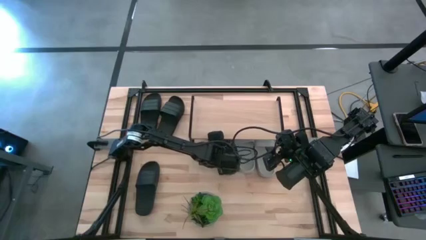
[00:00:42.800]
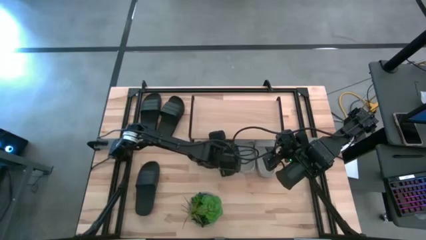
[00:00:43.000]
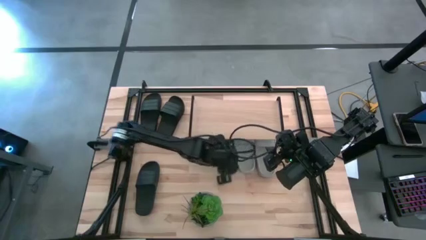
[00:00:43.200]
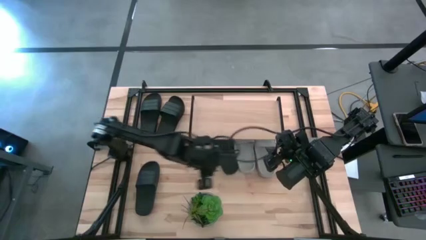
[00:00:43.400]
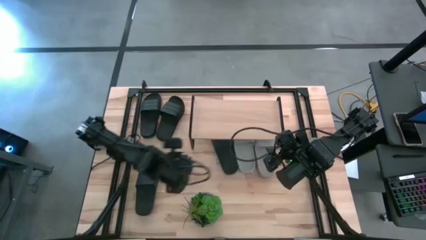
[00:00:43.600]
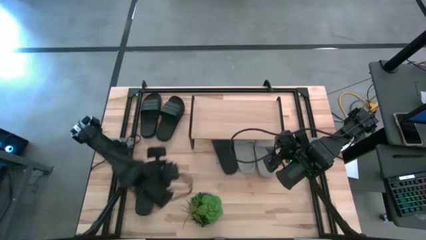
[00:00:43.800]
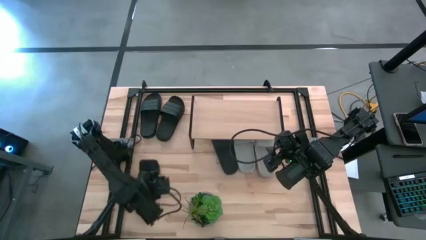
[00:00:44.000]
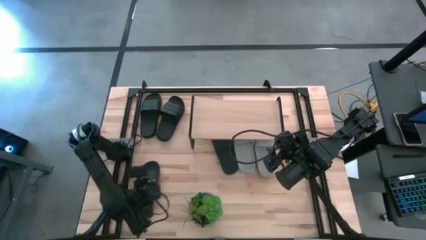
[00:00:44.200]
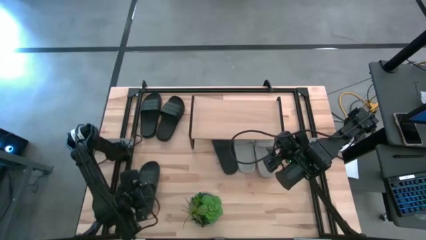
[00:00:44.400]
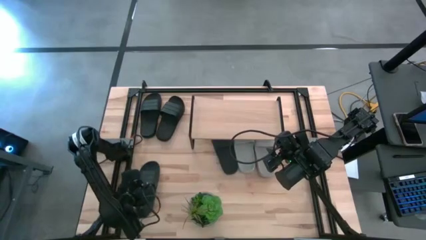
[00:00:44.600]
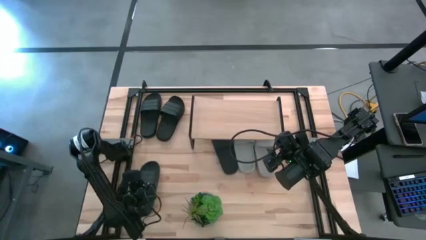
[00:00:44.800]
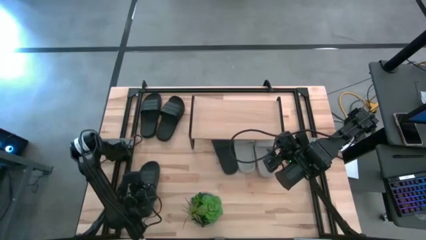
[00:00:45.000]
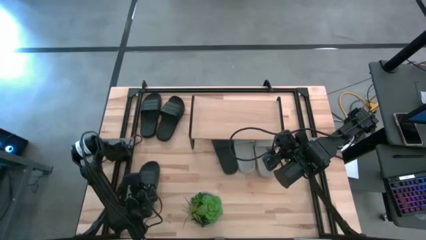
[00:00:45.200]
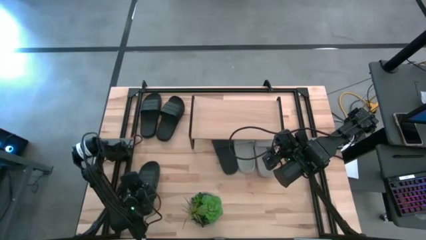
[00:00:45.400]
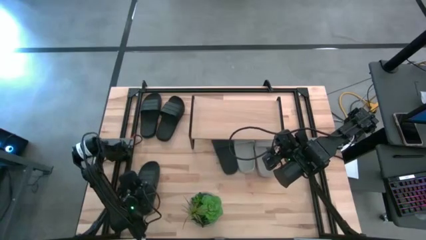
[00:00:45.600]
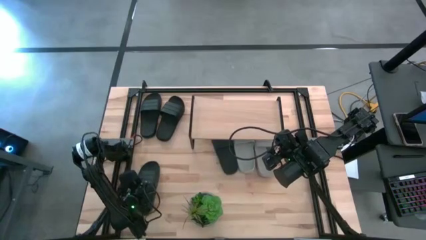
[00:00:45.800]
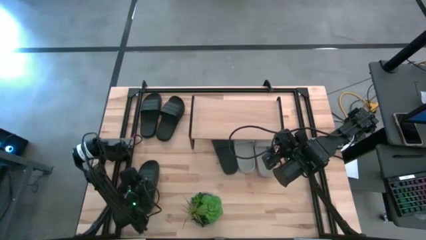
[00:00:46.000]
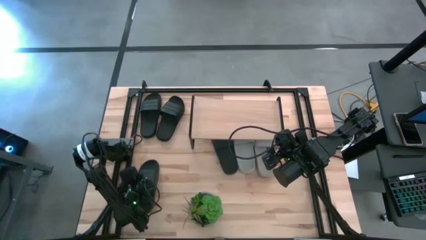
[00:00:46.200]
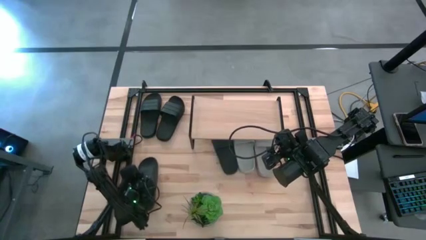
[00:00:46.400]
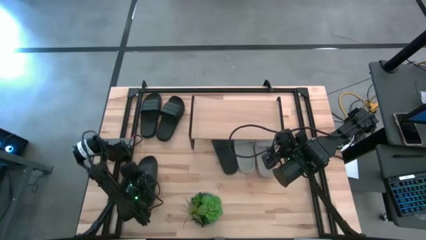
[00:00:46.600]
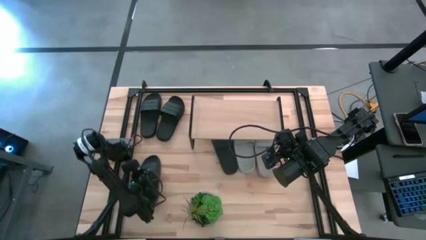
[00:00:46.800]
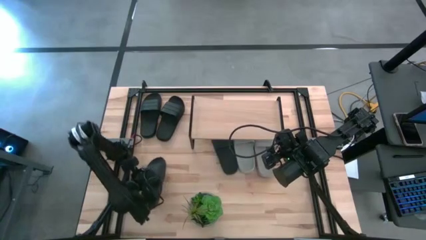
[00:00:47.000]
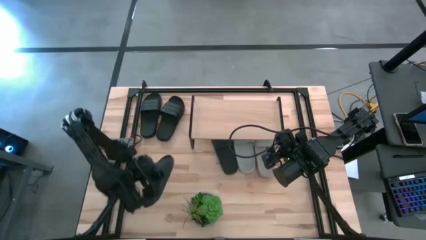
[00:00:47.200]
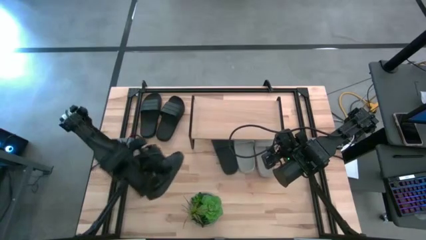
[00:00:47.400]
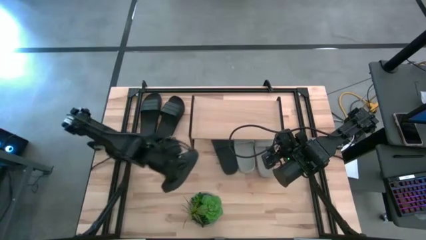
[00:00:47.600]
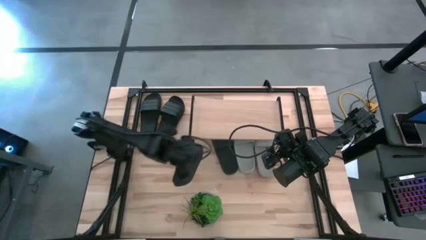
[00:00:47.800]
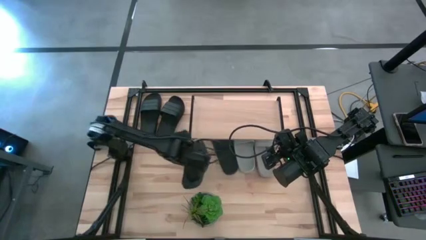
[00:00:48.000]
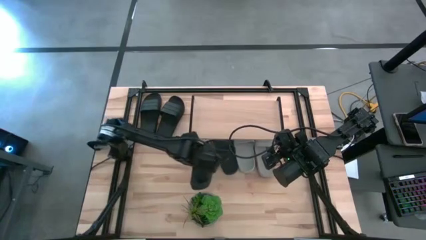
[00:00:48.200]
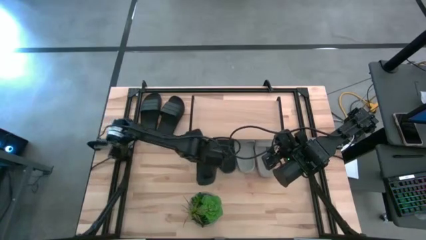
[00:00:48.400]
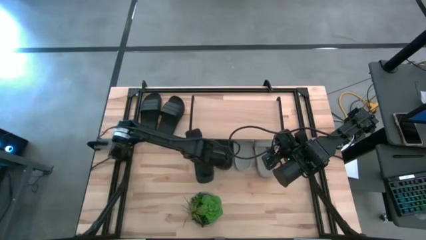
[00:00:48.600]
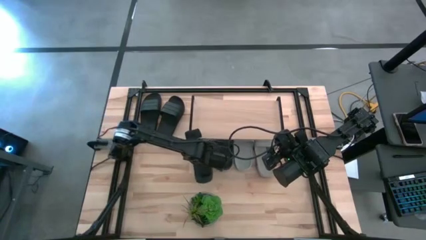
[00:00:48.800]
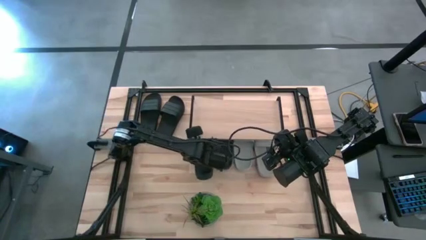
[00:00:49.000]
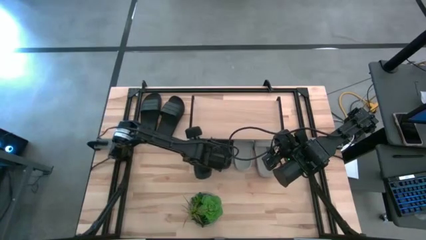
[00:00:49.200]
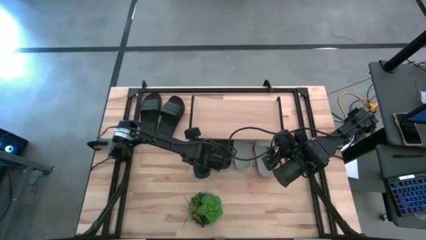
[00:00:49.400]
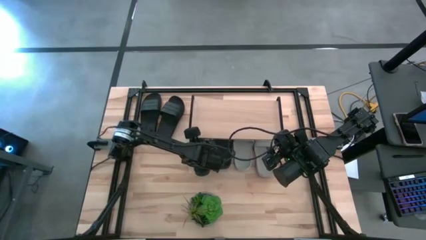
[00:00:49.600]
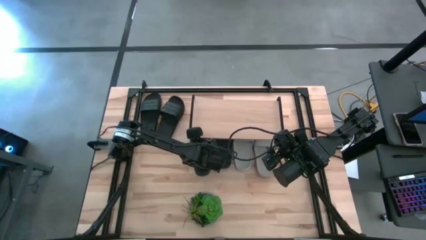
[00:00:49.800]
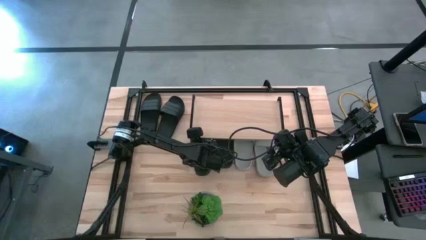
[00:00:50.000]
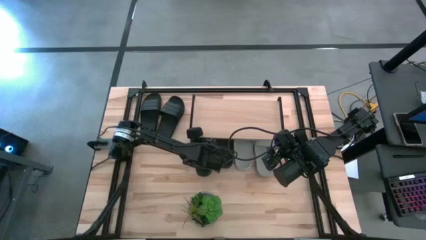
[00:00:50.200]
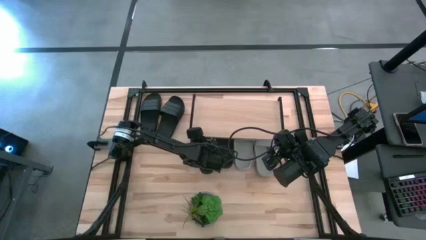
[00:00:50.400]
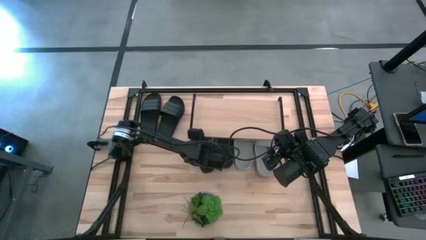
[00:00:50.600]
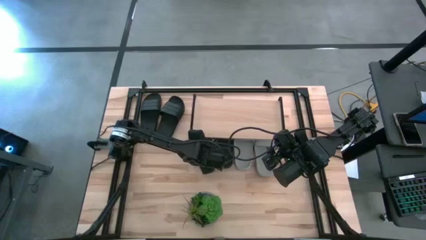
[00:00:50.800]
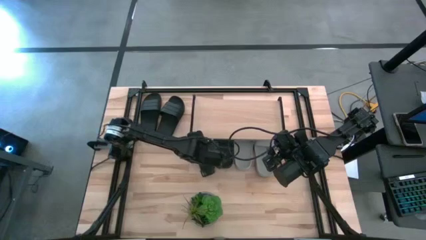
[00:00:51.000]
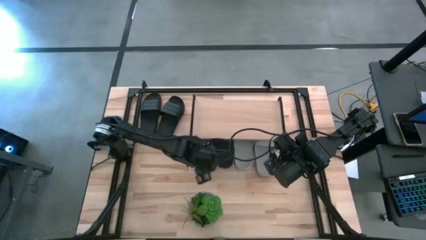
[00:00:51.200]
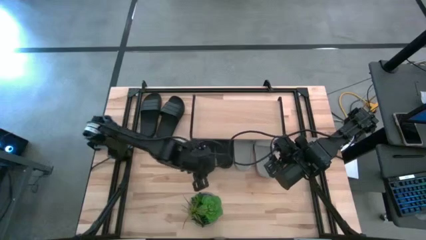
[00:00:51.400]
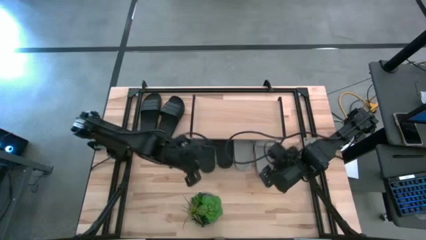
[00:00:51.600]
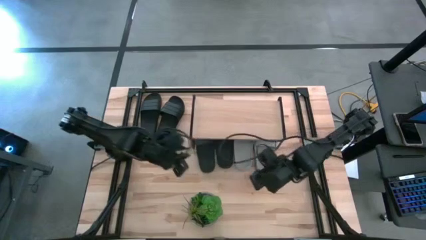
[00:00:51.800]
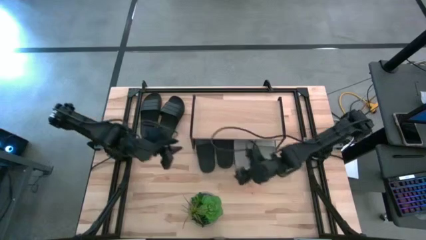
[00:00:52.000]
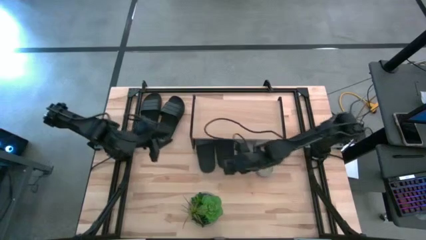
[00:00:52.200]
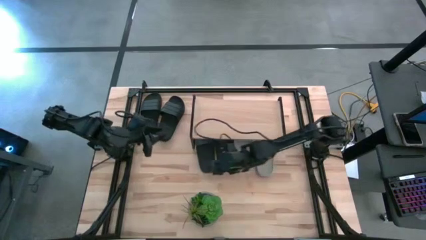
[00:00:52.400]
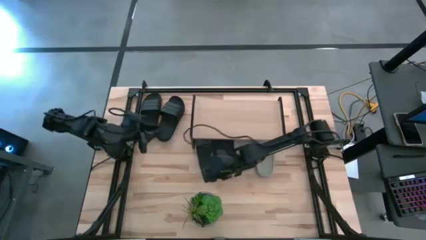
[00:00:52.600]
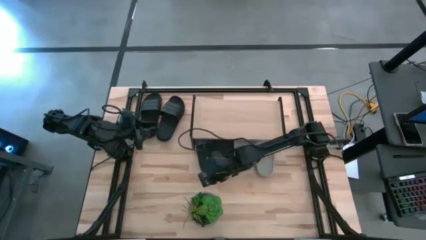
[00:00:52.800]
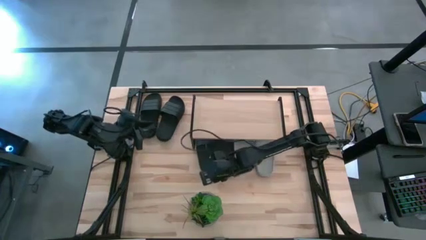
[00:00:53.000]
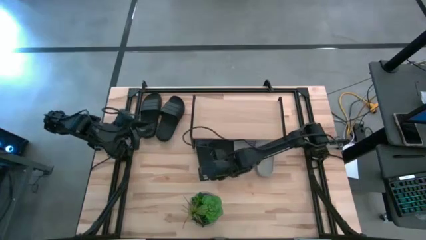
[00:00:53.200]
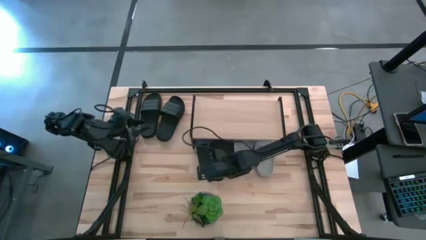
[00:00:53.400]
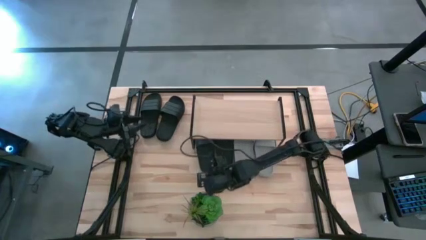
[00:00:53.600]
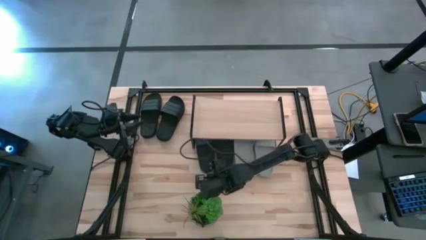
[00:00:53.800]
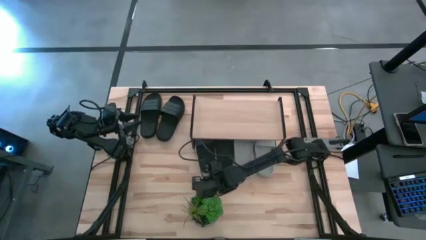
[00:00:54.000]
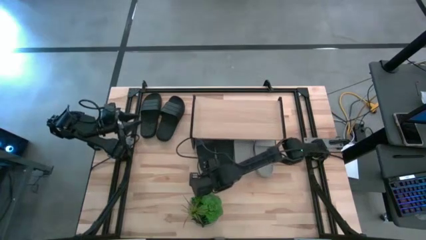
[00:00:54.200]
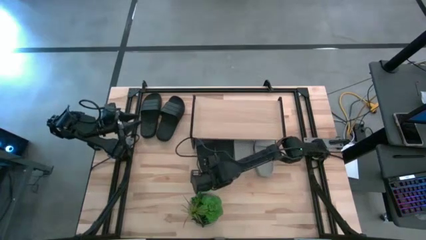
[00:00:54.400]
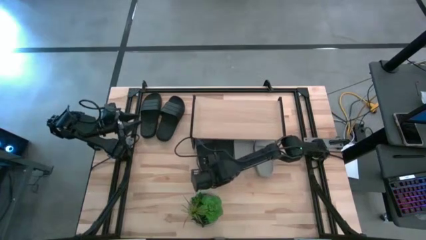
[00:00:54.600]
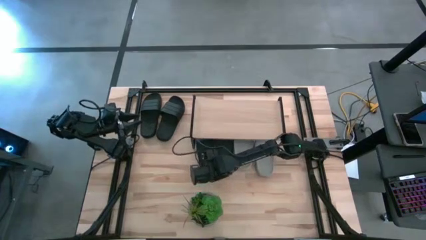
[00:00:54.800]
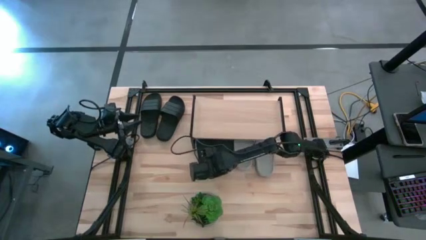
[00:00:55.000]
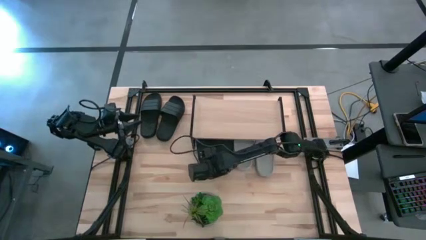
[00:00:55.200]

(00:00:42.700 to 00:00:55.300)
Task: Pick and place slides into the shelf
Put the black slide under the shelf
